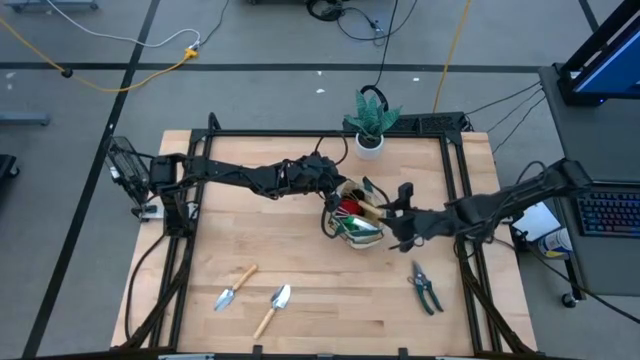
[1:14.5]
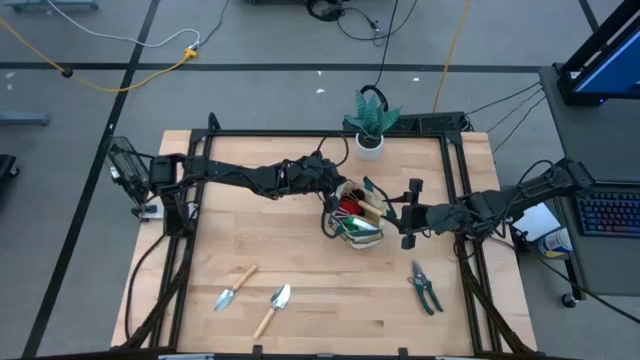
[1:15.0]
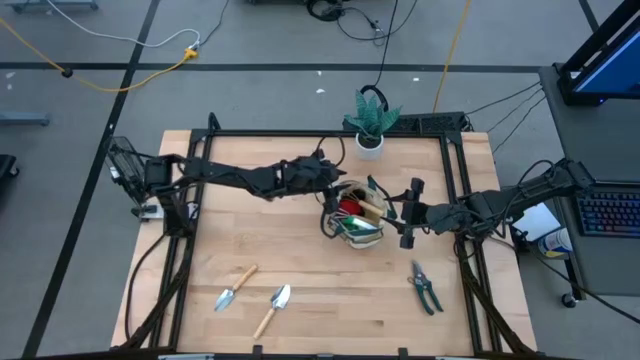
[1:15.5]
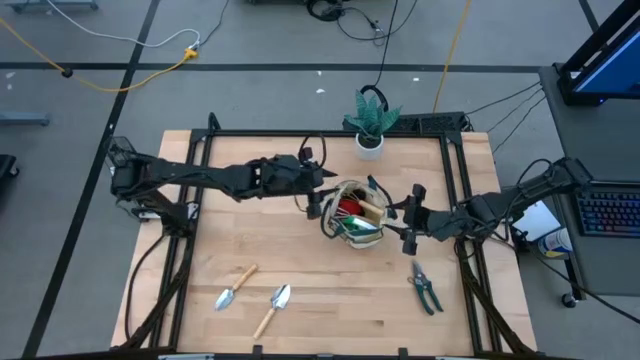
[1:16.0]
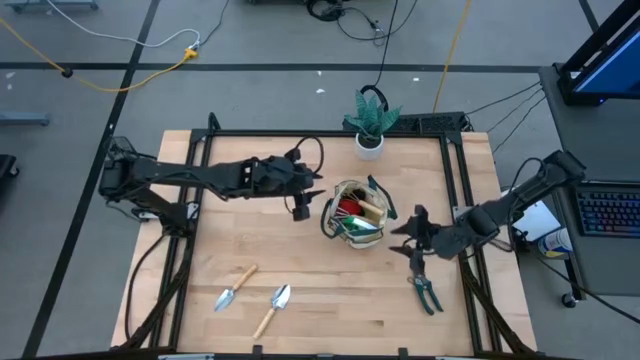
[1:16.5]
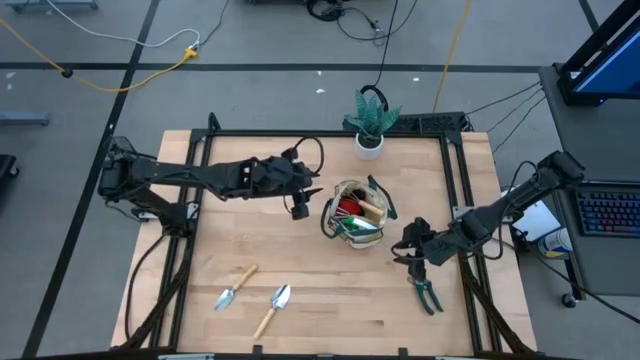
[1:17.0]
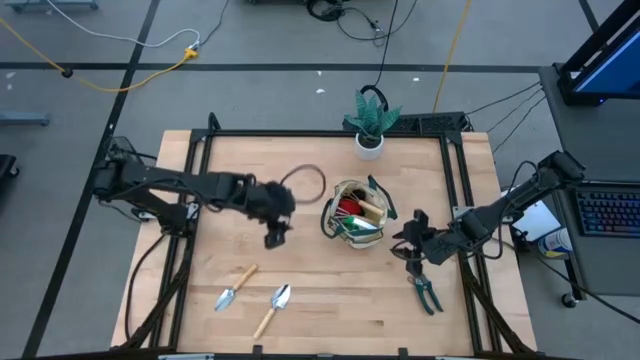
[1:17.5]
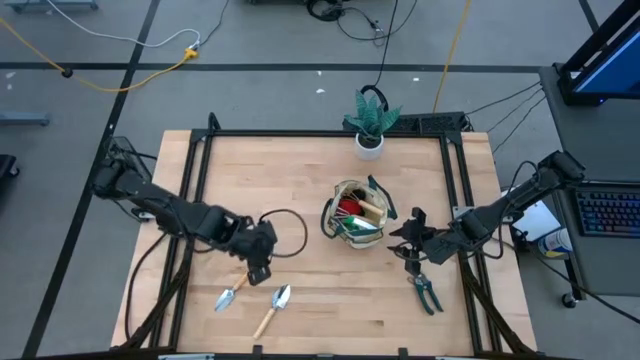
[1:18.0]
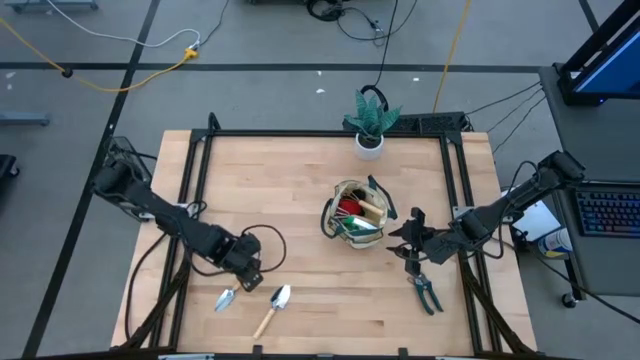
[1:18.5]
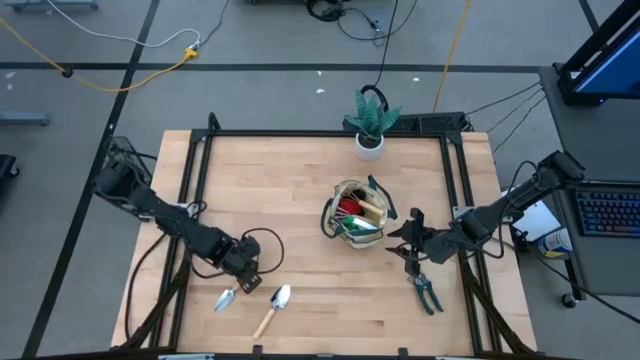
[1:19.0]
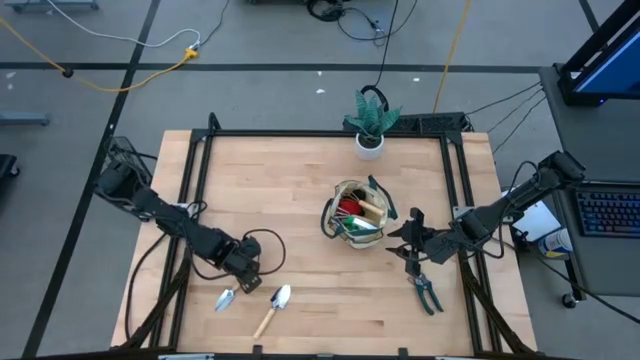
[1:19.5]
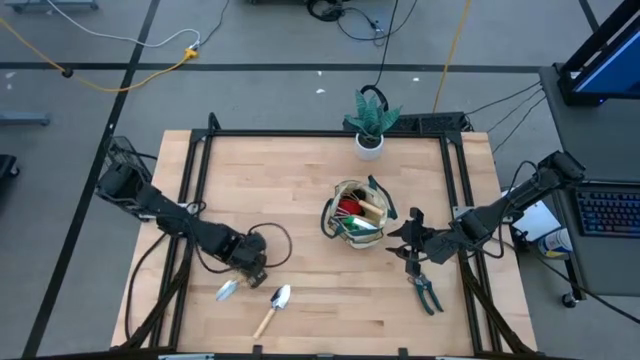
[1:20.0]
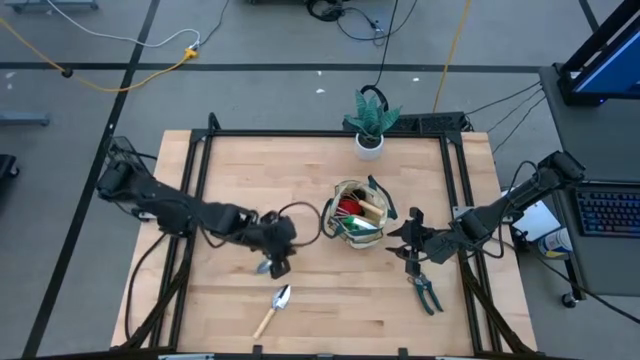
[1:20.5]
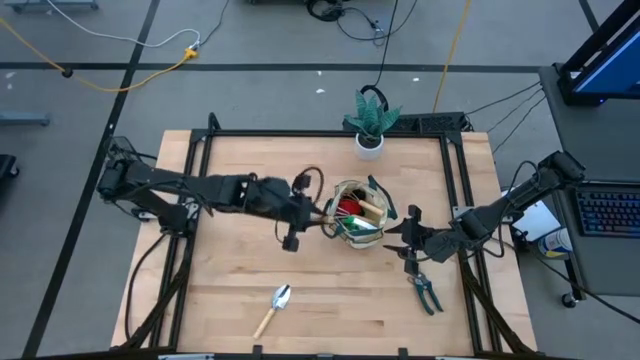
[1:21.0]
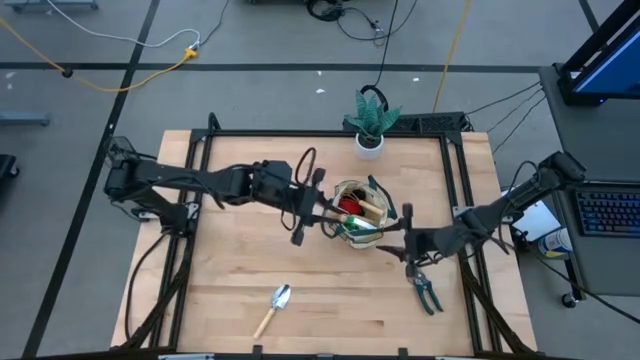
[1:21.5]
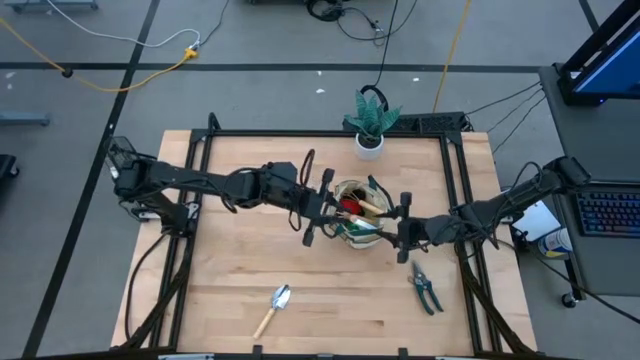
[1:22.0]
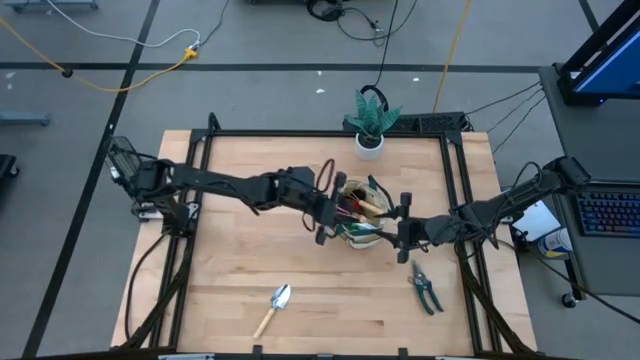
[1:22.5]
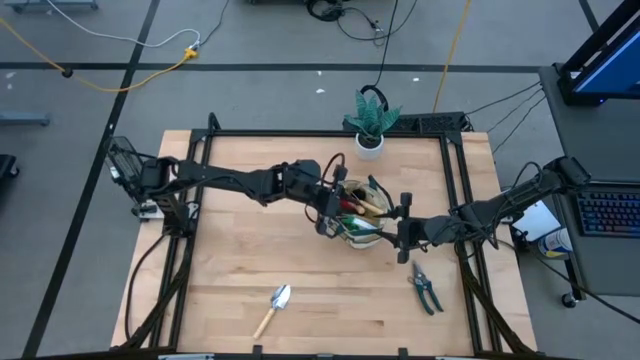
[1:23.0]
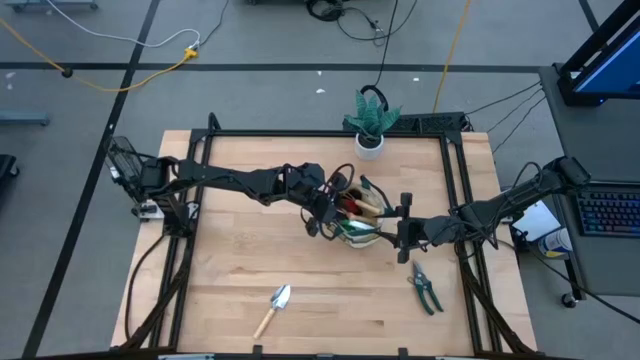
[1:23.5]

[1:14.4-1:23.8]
Task: Pick & Place Garden tools in Gardening bag
Put the left brown trowel into the gardening bag

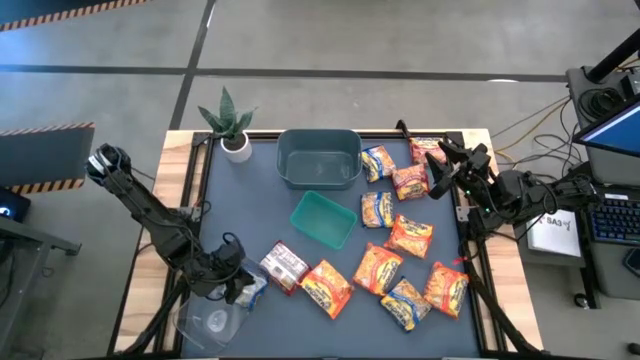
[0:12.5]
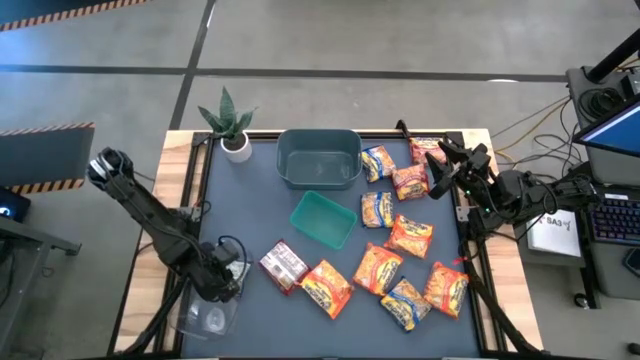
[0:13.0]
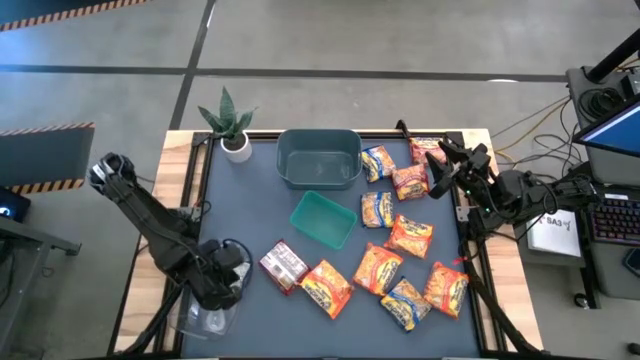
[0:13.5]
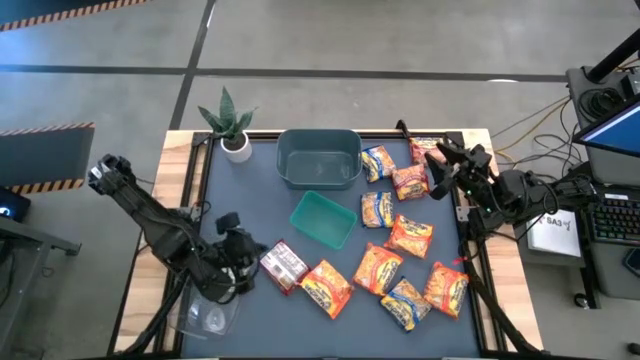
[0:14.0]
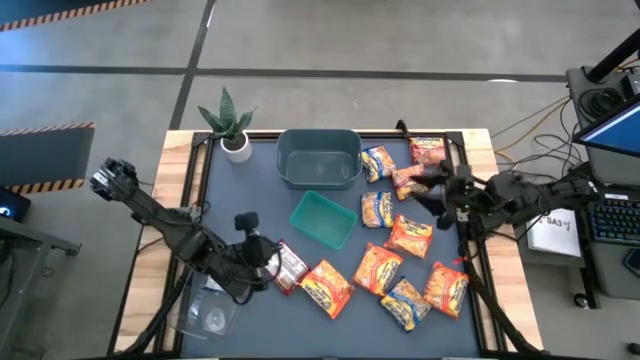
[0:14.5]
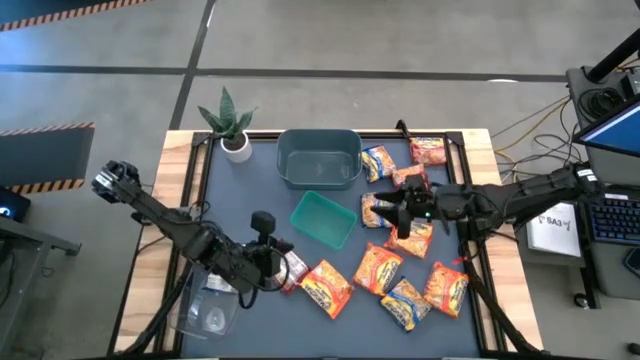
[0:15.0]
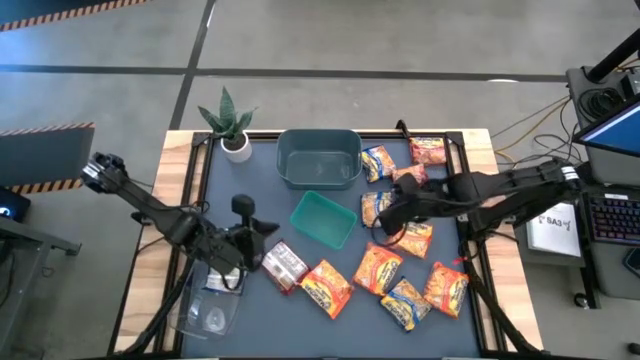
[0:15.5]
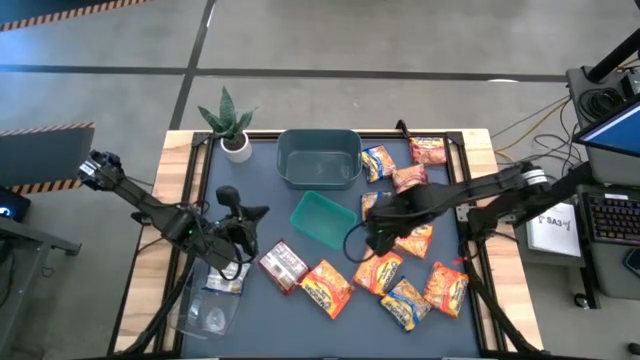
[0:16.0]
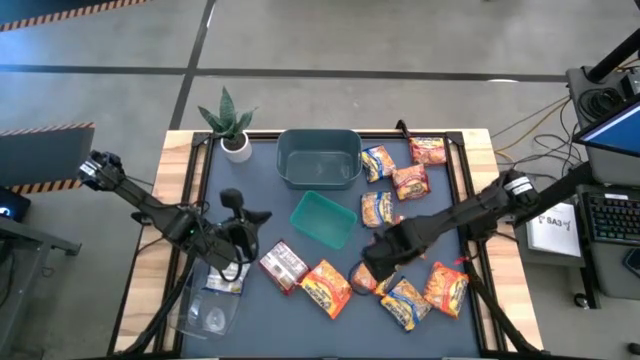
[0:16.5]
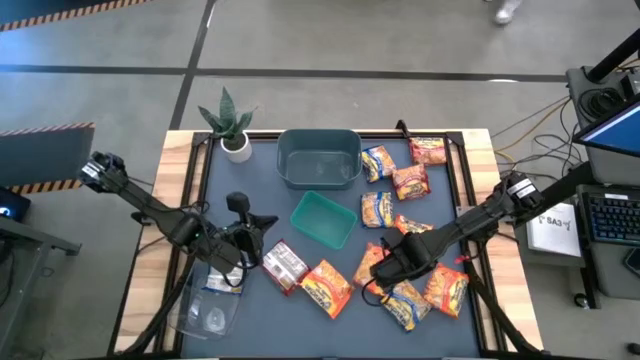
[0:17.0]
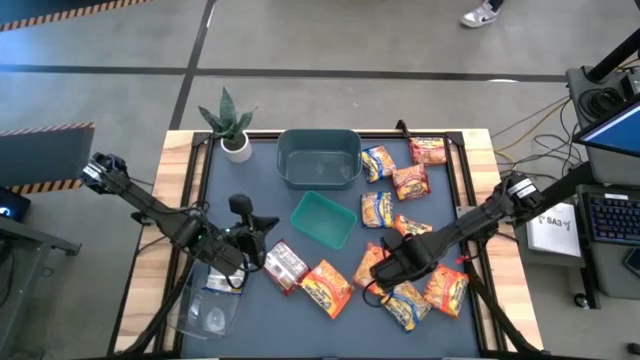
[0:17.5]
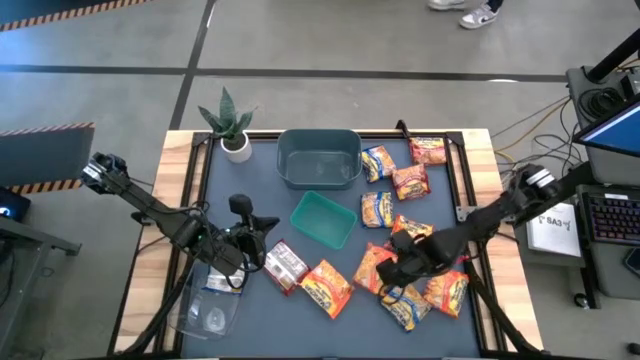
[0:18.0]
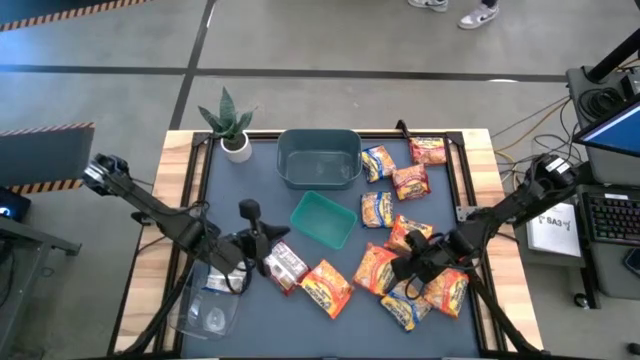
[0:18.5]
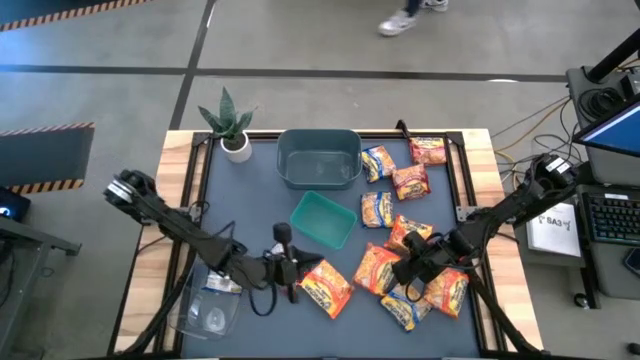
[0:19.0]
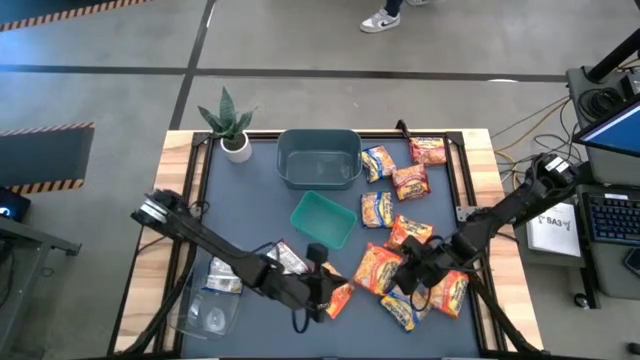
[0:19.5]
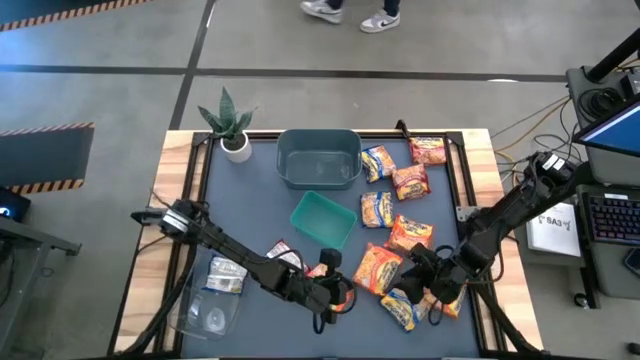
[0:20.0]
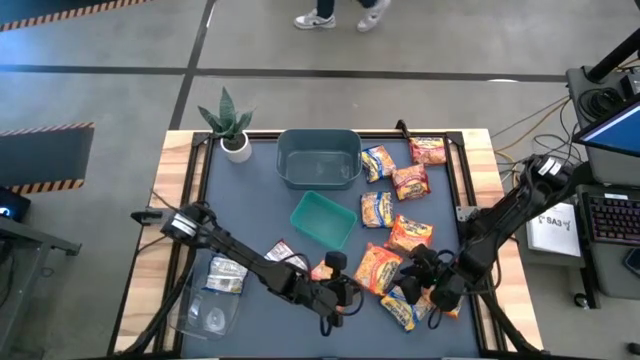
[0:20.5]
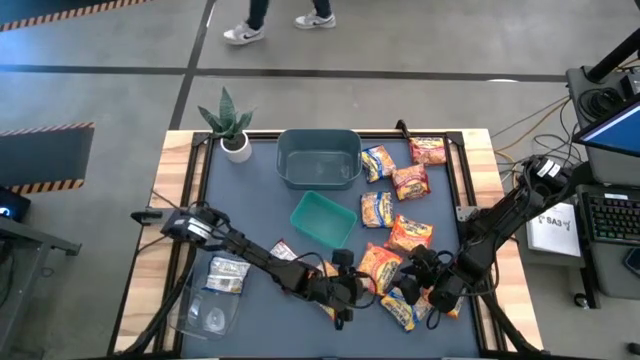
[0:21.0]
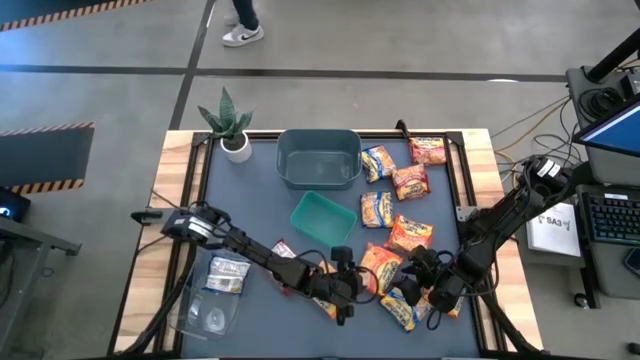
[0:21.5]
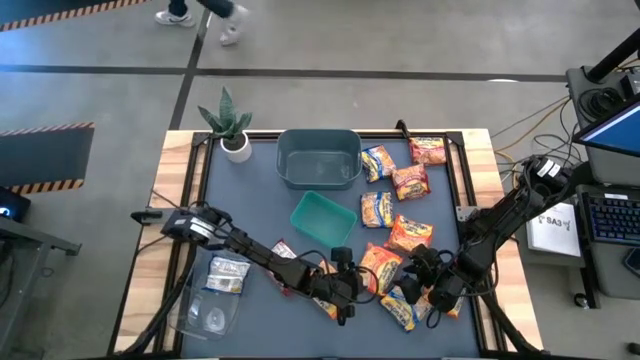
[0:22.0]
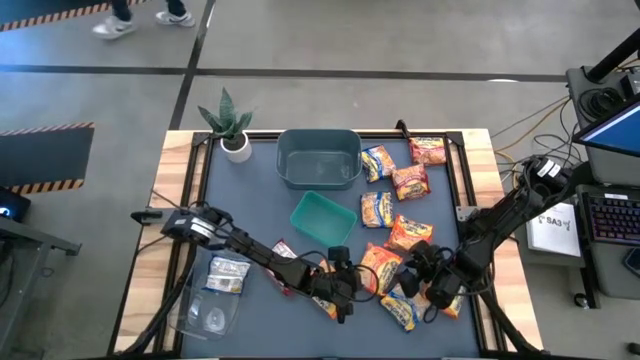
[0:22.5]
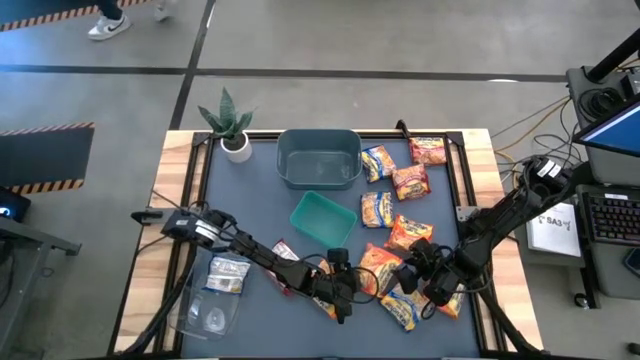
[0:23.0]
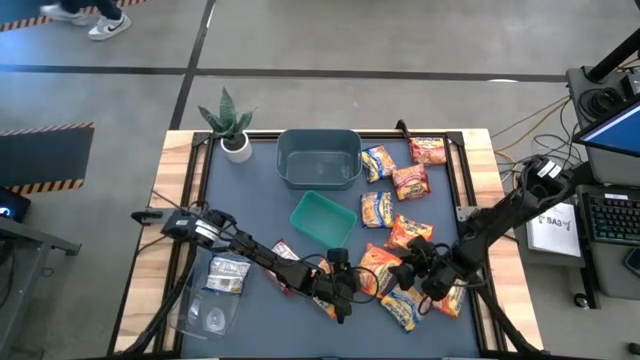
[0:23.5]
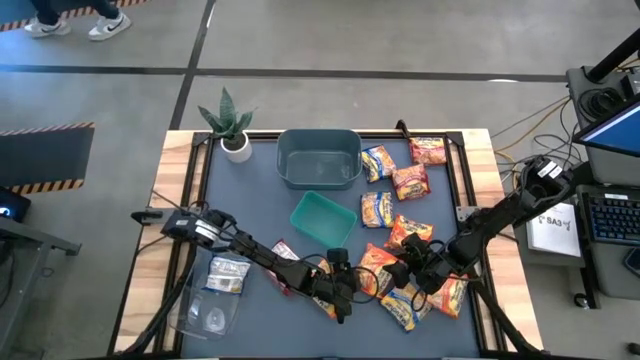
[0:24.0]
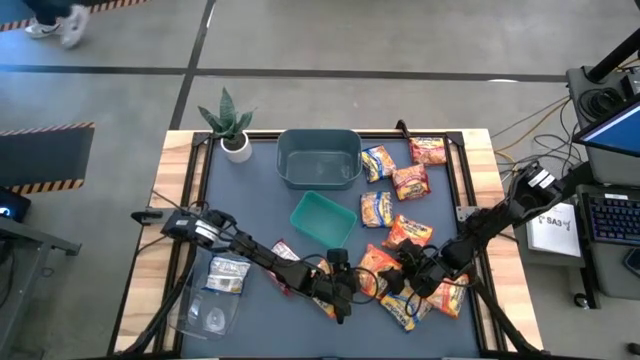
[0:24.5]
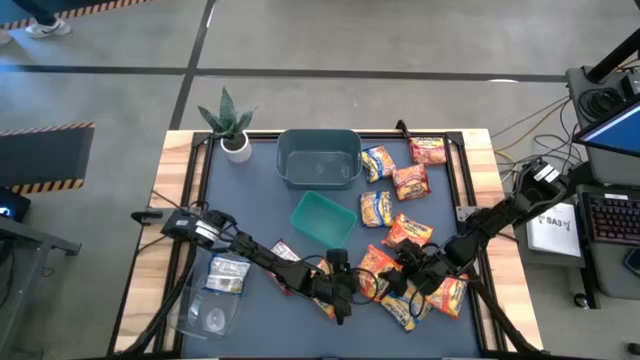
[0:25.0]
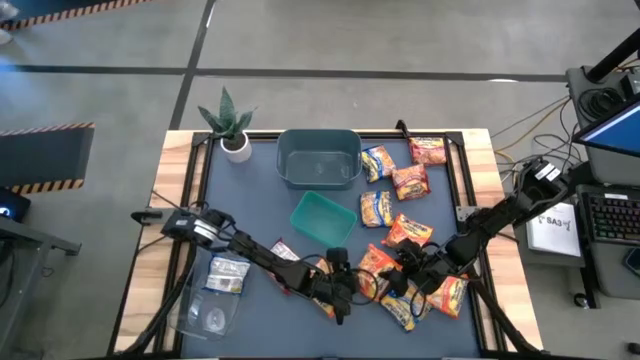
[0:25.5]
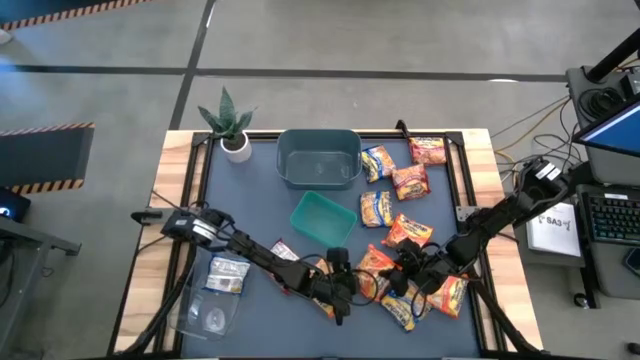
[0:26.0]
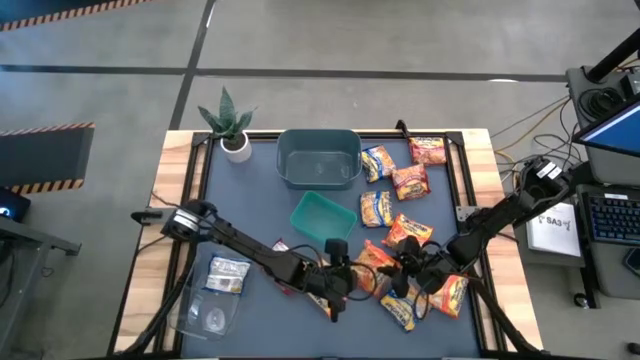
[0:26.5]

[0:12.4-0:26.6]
Task: Sort Maruchan noodles
Put the orange noodle pack into the green bin
